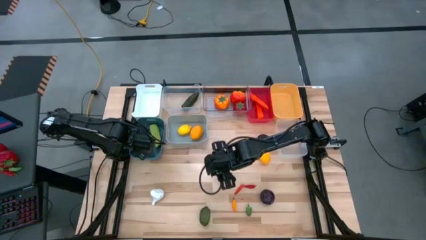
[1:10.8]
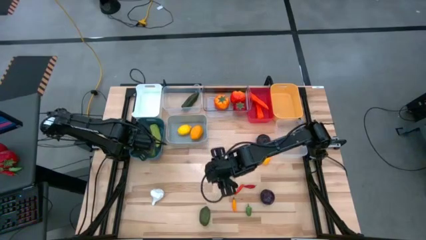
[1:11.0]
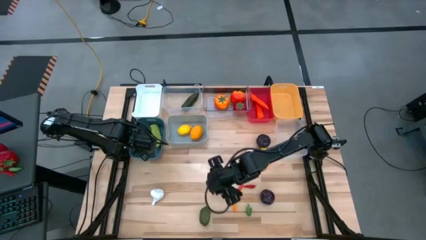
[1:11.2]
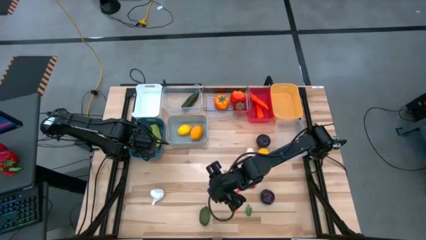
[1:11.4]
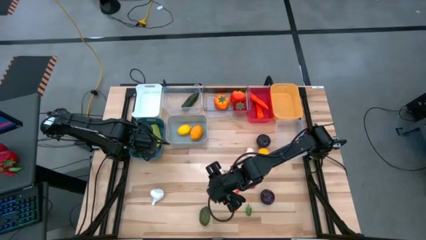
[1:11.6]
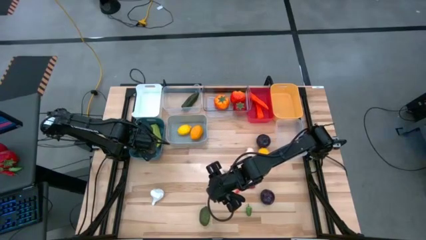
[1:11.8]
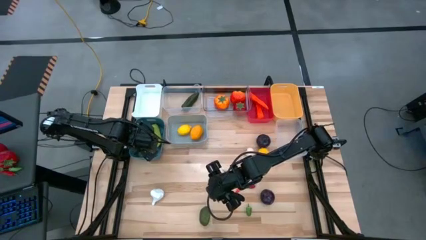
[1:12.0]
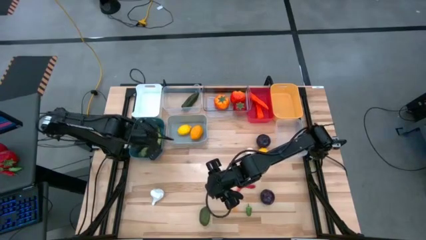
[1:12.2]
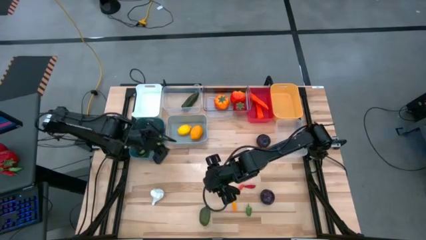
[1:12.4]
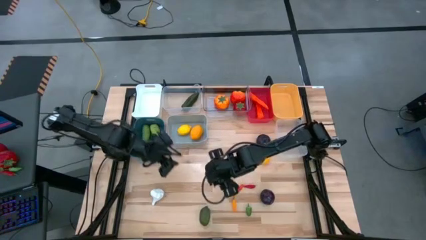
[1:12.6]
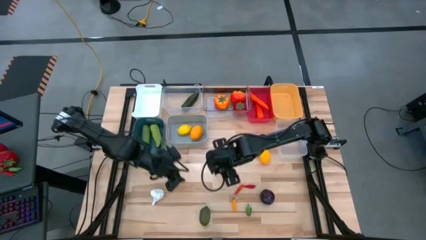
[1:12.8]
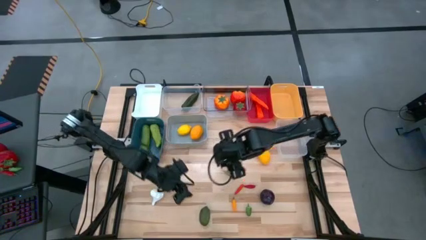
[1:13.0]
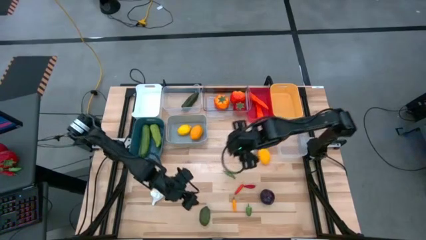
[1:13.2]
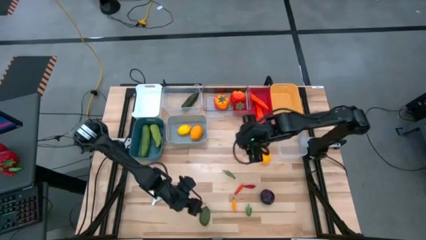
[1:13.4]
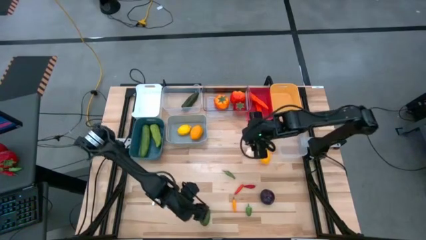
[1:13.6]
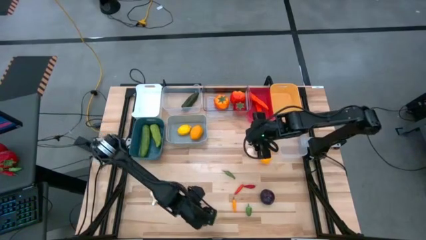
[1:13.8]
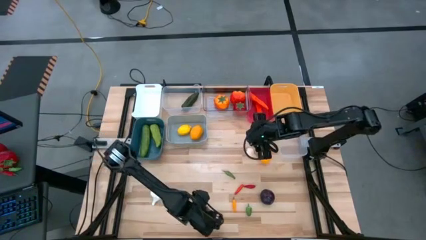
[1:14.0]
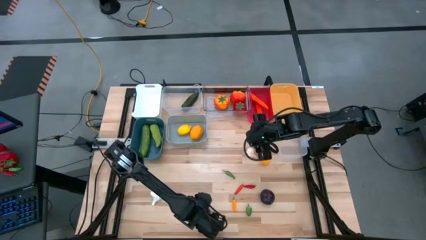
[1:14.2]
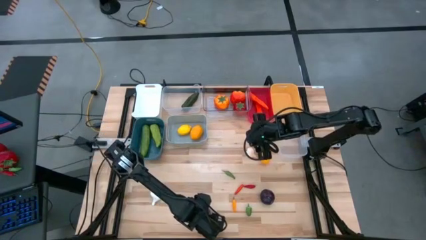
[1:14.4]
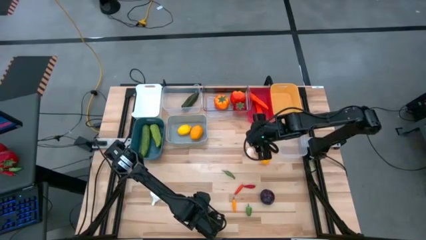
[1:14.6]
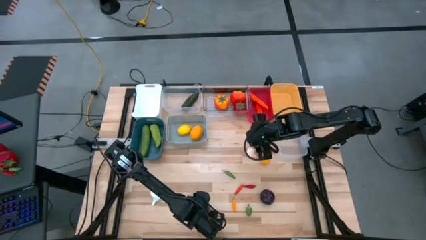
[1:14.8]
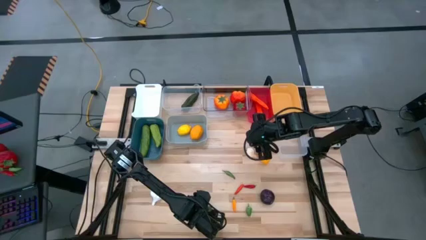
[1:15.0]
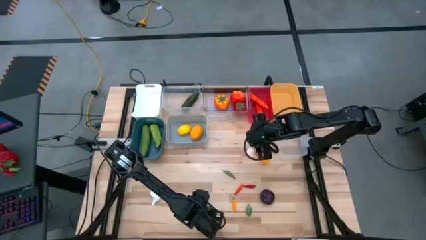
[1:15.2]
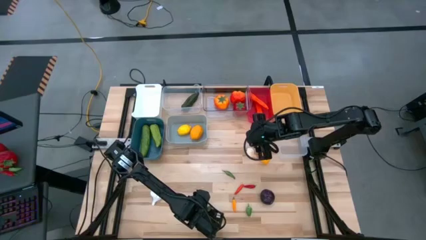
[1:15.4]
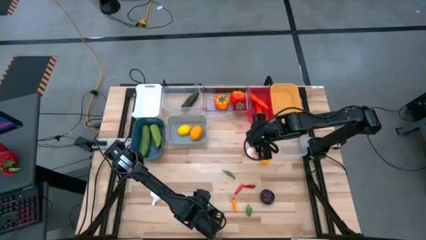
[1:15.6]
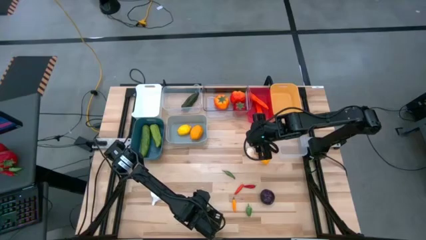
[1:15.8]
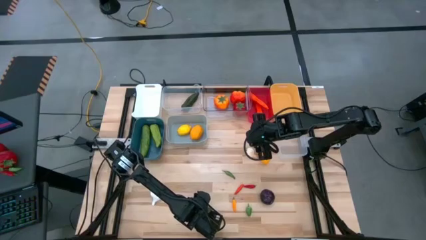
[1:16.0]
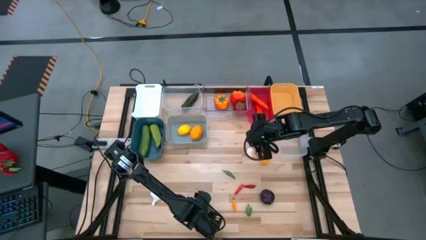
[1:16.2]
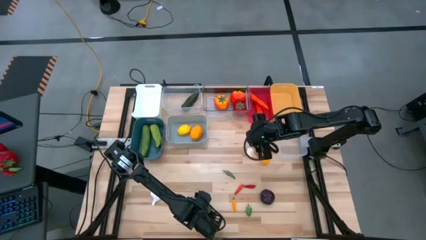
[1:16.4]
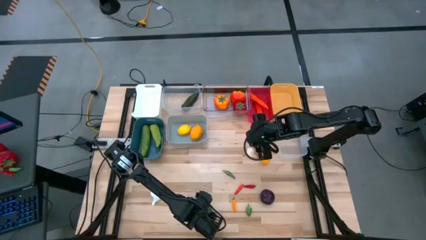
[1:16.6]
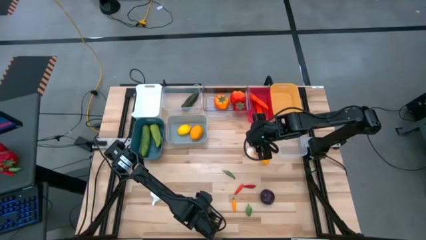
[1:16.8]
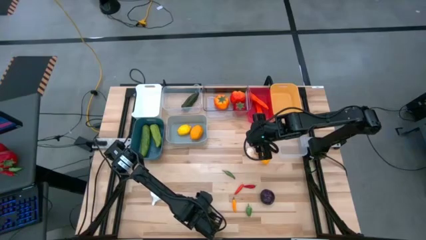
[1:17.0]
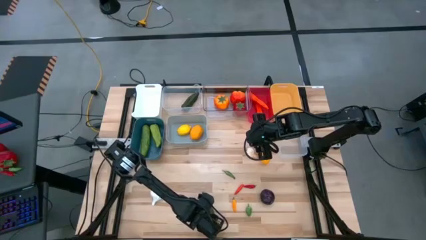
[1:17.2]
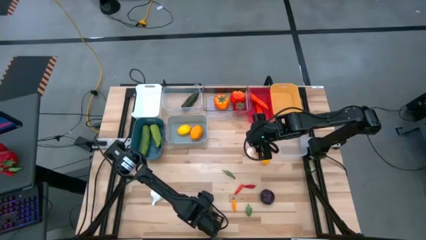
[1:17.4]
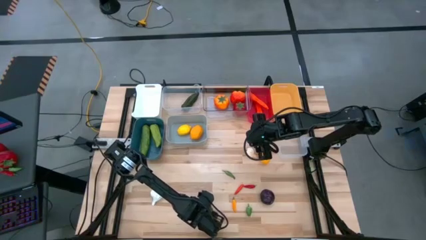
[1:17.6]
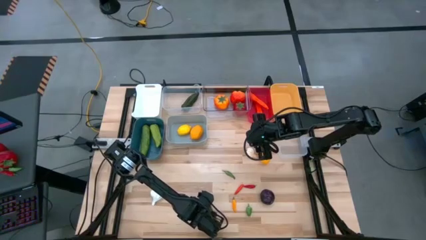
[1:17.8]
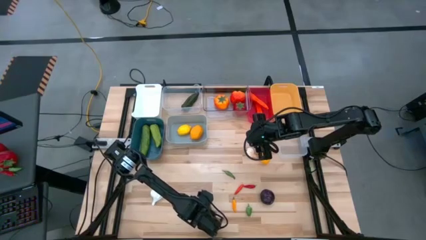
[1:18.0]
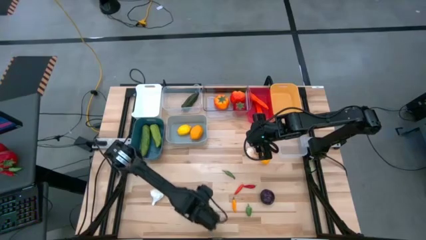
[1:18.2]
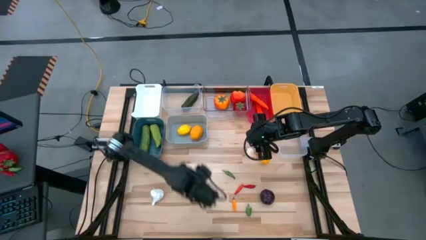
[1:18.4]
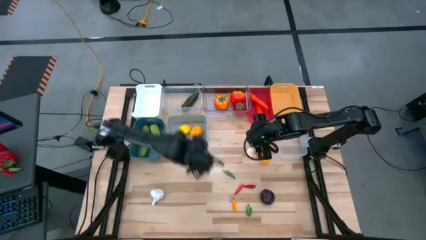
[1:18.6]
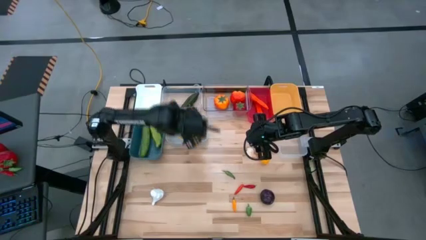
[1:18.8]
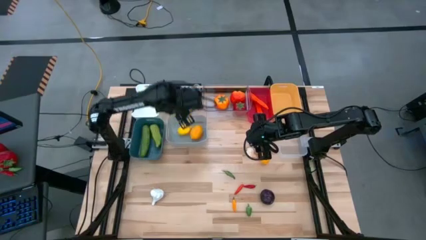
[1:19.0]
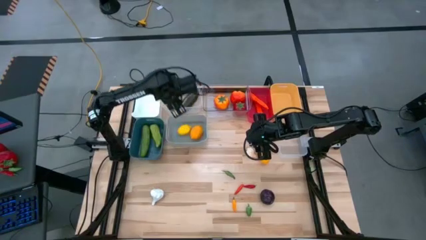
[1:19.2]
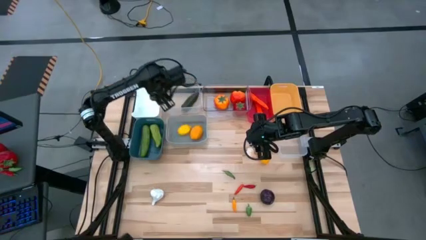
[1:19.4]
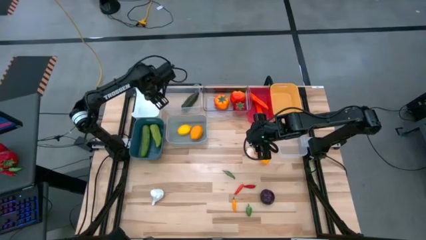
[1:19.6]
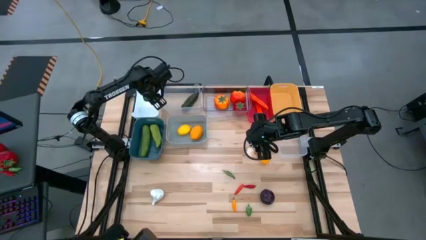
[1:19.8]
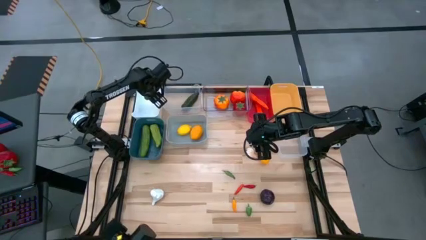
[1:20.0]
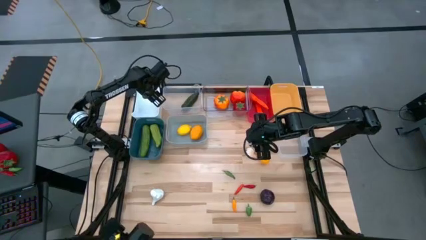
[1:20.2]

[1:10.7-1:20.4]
Task: Sort produce into baskets
Put the lime into the white bin

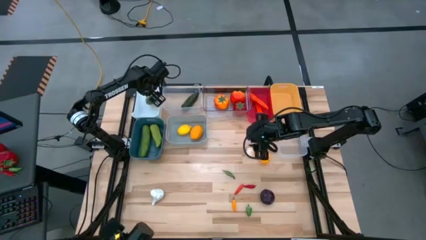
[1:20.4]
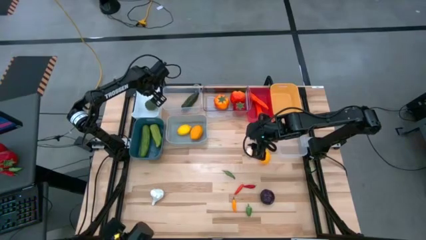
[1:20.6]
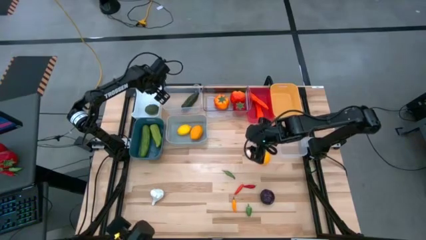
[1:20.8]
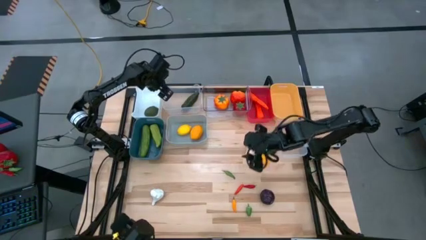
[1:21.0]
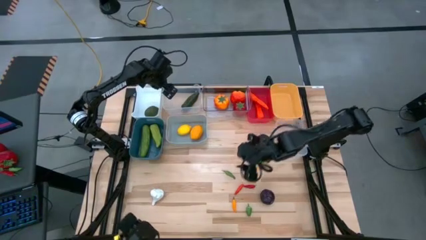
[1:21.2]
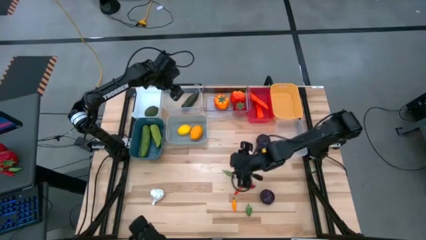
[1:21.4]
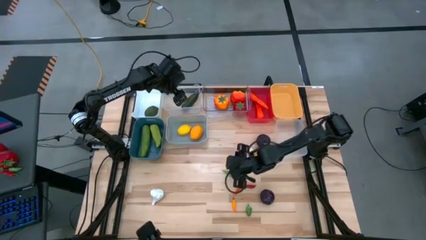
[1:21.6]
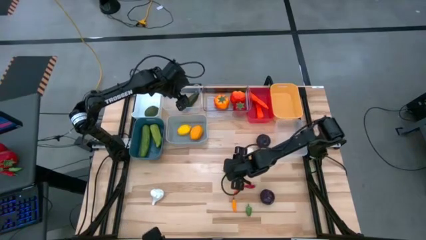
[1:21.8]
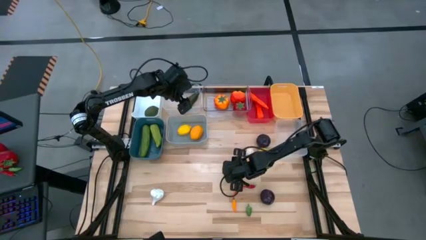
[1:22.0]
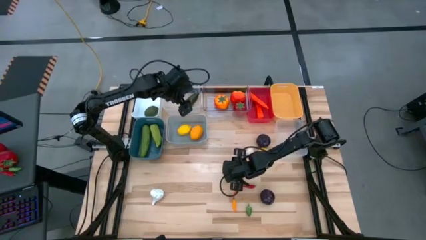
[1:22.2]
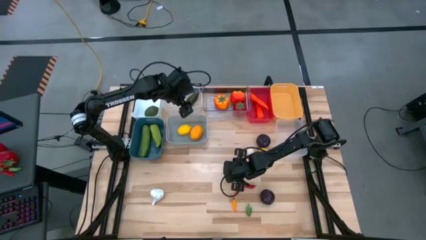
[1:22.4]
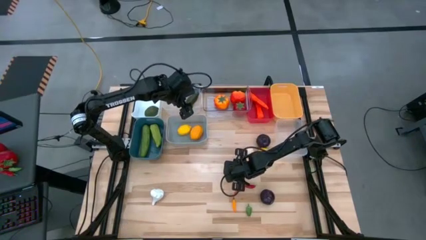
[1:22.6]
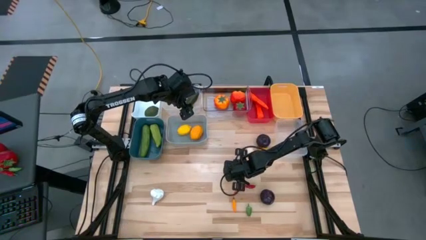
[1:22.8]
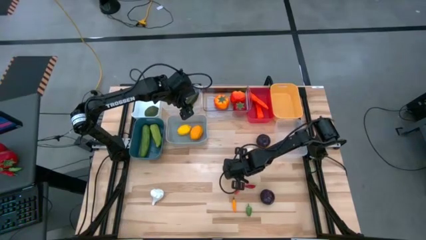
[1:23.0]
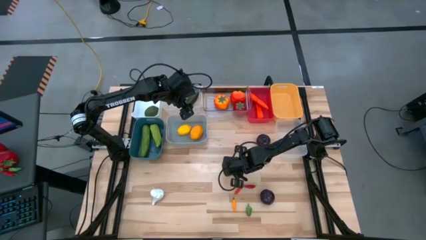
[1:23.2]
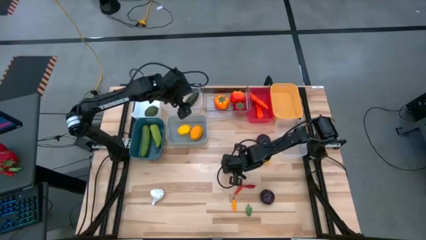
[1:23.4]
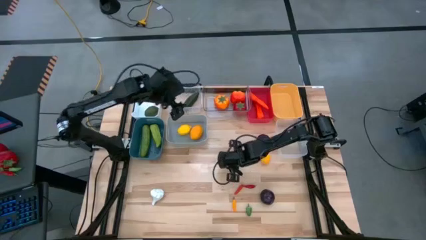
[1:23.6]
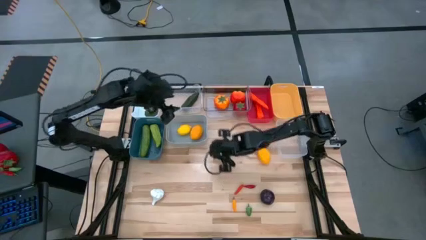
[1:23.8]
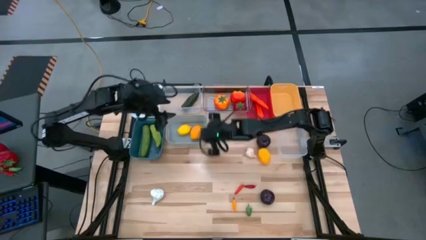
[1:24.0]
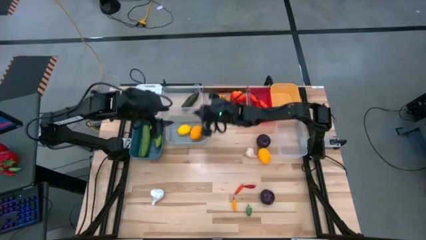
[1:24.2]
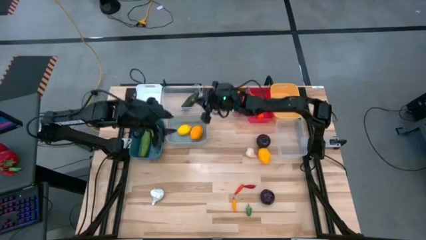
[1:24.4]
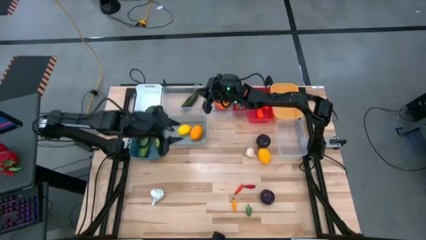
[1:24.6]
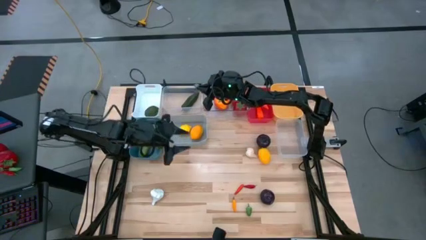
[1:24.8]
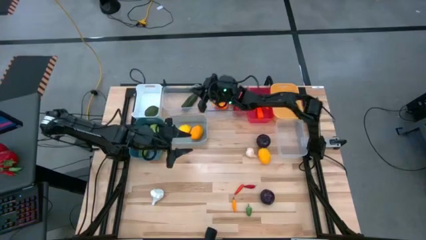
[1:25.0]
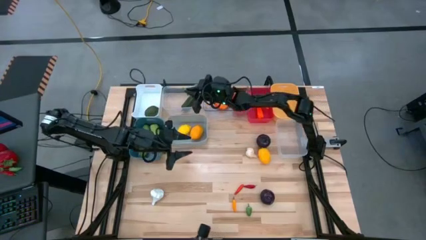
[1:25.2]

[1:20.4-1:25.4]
Put the green chili pepper into the top left transparent bin

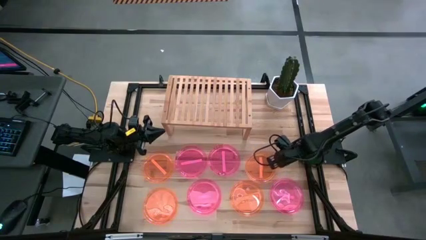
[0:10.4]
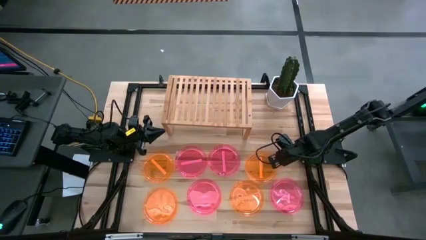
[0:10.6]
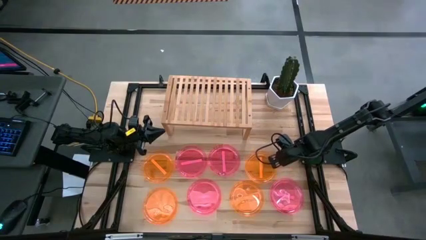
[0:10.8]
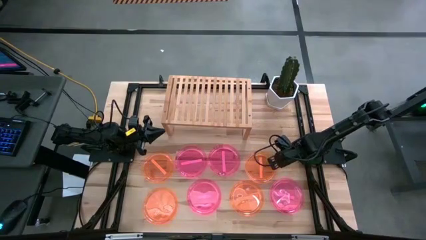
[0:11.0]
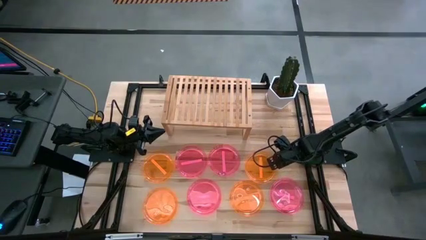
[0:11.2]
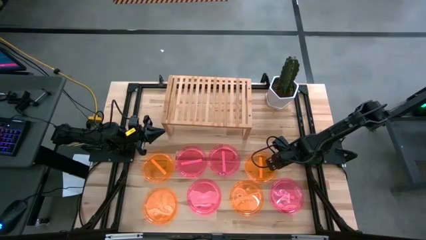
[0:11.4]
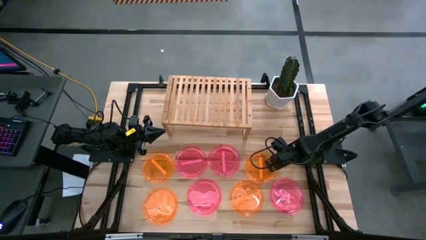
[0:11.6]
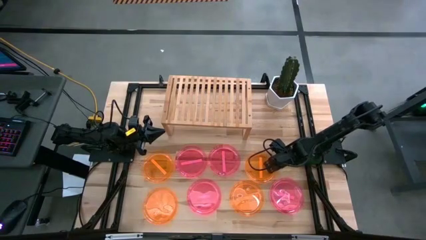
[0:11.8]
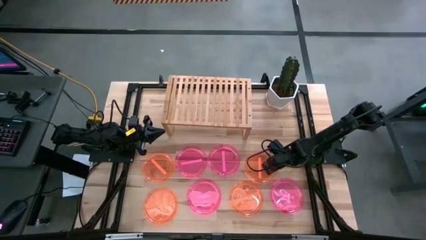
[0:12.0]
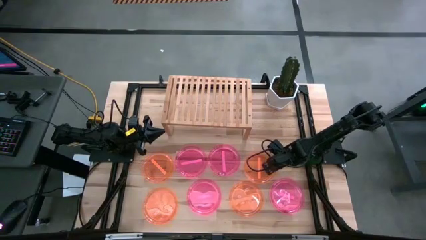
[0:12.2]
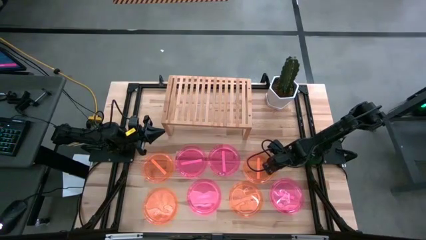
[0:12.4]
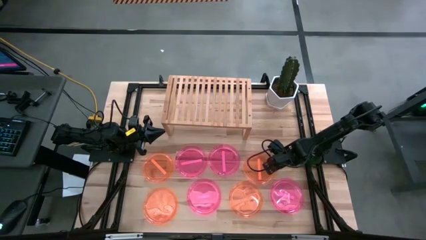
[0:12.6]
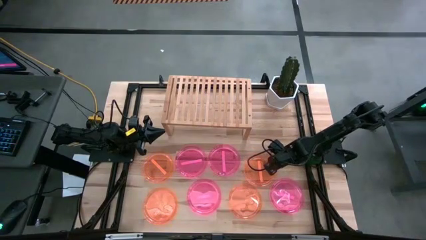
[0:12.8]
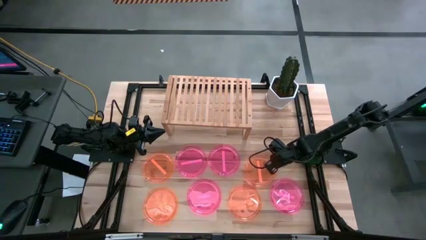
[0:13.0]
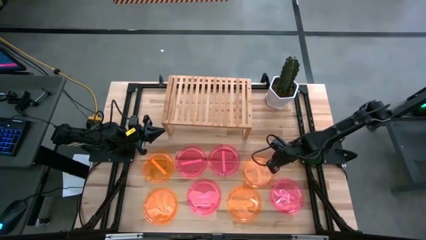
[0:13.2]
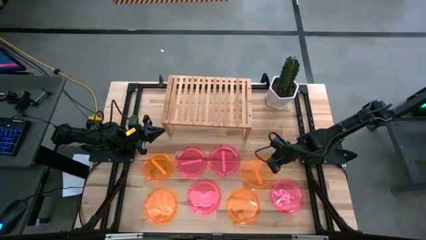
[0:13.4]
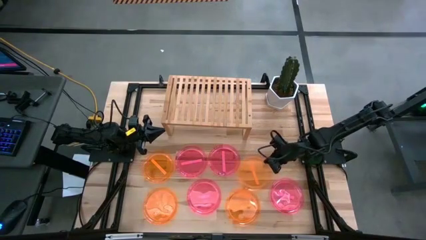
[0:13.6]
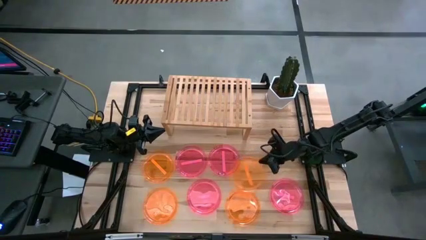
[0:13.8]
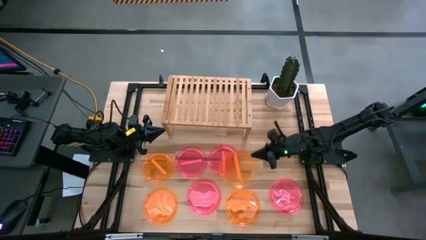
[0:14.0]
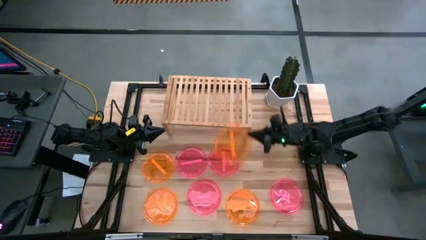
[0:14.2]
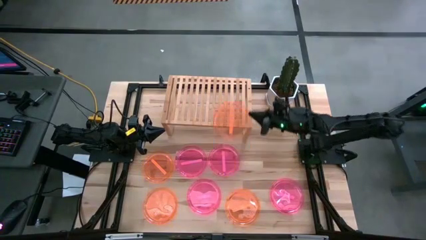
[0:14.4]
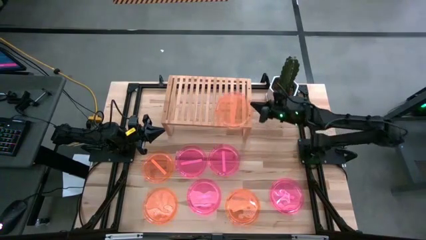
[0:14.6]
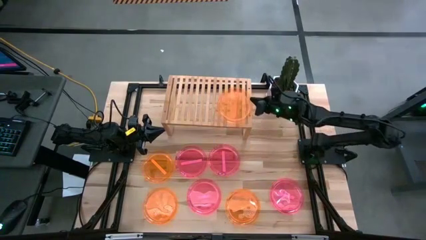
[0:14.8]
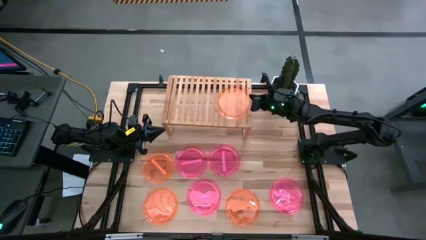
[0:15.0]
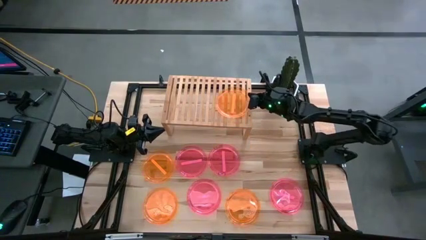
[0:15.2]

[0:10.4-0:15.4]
Task: Place and stack plates onto a shelf
Put the orange plate on the shelf
